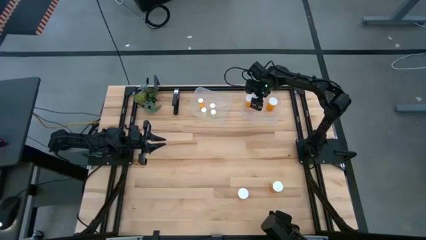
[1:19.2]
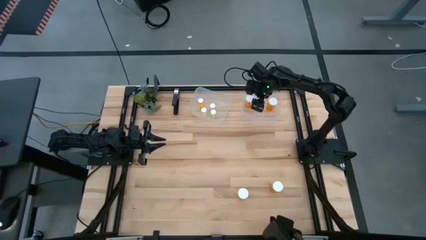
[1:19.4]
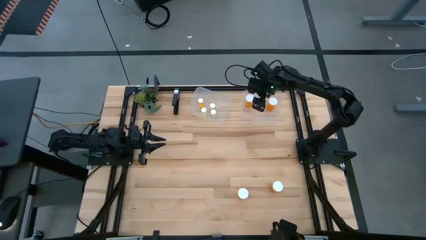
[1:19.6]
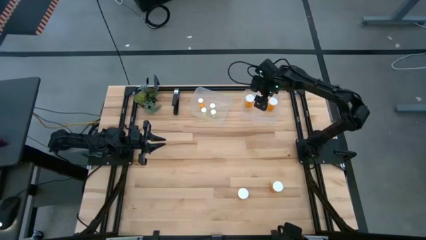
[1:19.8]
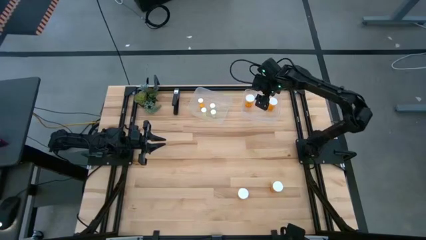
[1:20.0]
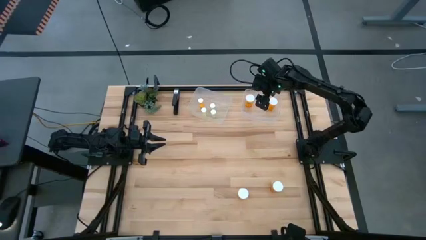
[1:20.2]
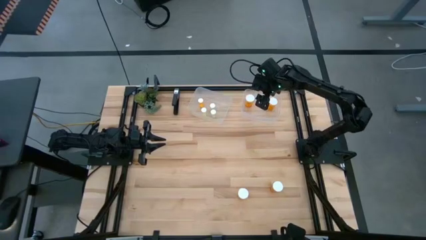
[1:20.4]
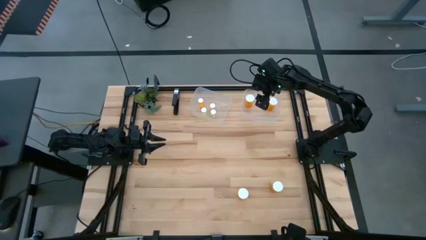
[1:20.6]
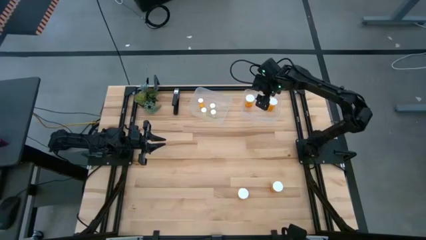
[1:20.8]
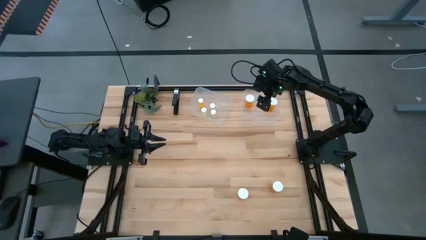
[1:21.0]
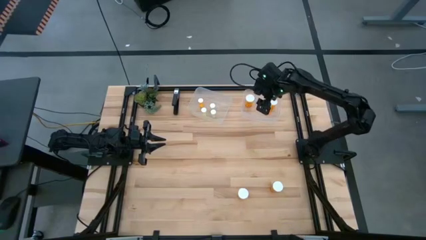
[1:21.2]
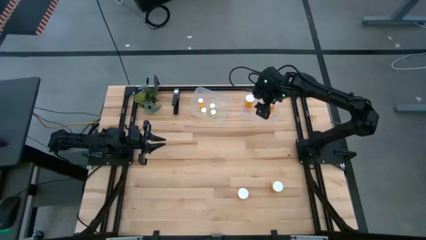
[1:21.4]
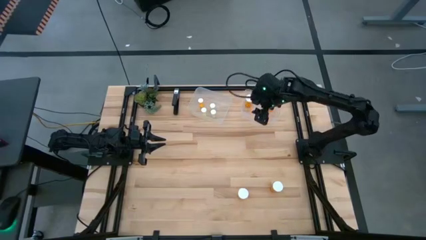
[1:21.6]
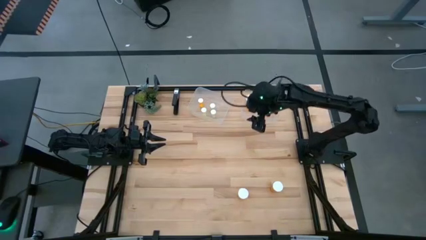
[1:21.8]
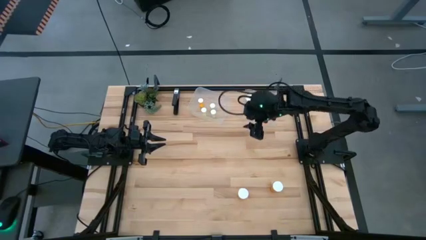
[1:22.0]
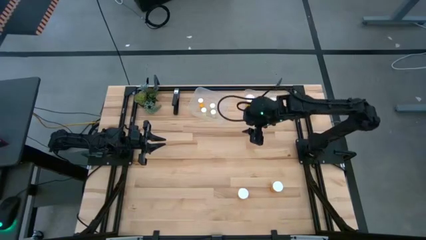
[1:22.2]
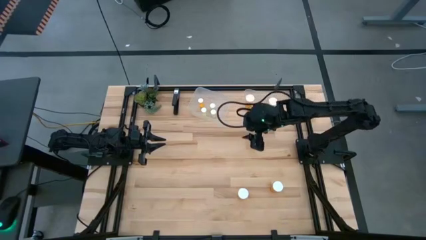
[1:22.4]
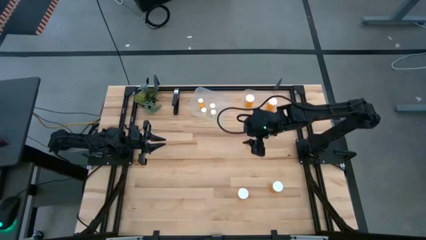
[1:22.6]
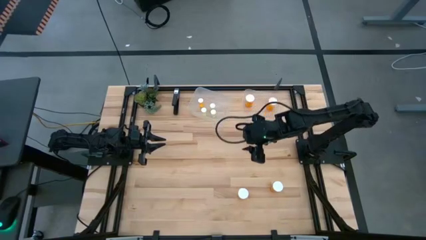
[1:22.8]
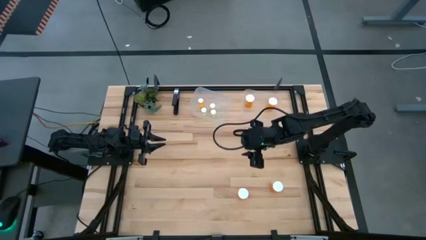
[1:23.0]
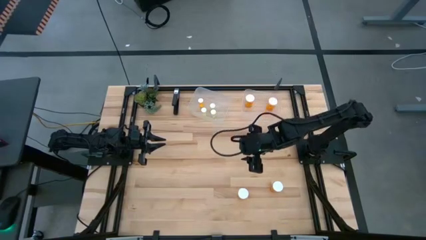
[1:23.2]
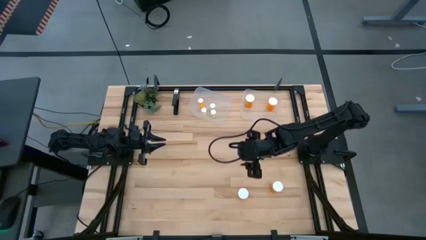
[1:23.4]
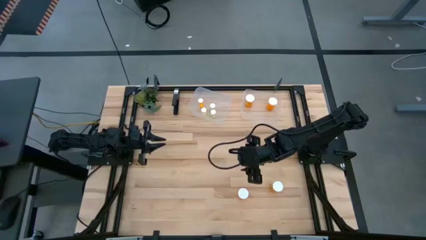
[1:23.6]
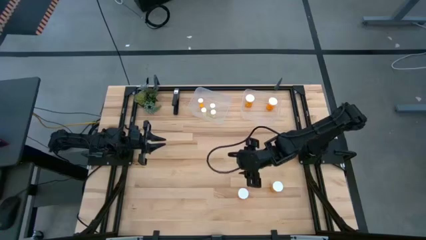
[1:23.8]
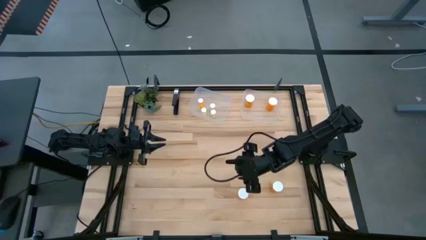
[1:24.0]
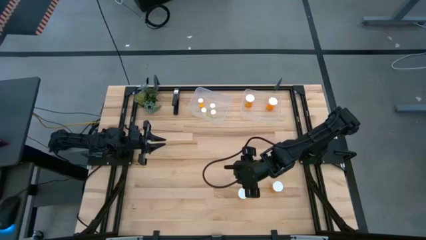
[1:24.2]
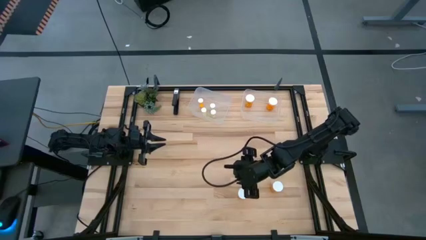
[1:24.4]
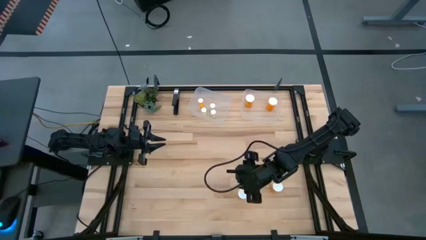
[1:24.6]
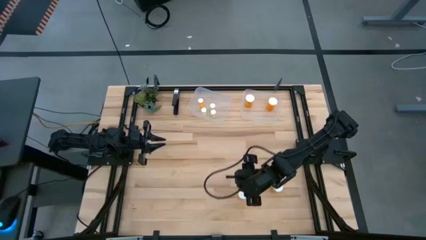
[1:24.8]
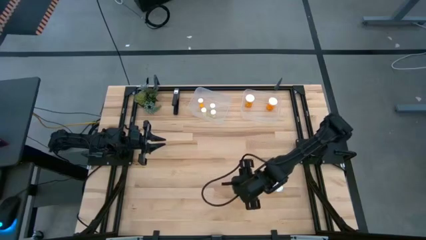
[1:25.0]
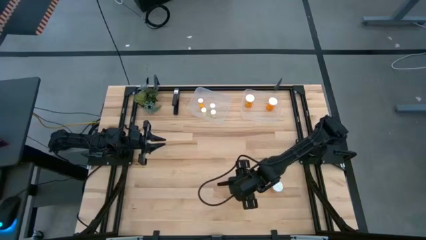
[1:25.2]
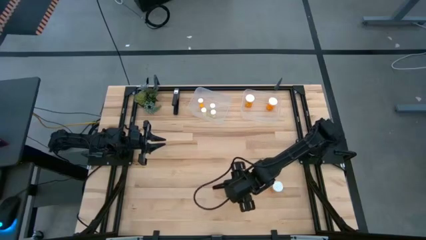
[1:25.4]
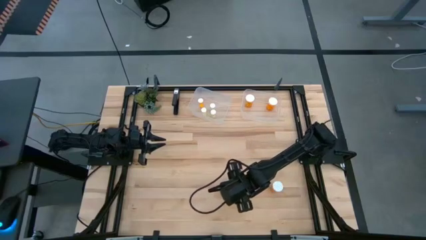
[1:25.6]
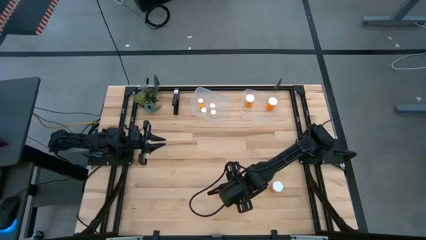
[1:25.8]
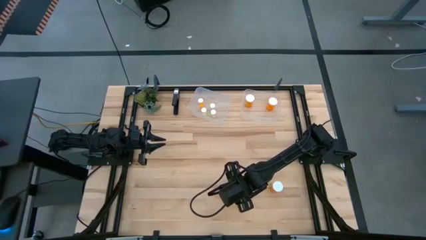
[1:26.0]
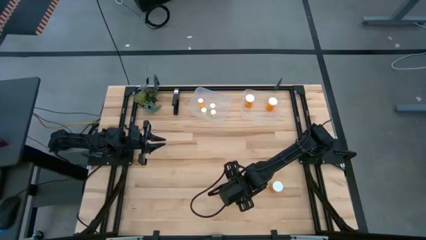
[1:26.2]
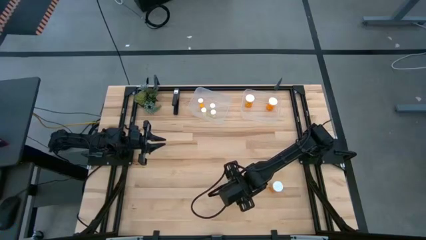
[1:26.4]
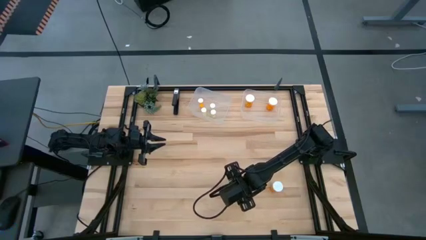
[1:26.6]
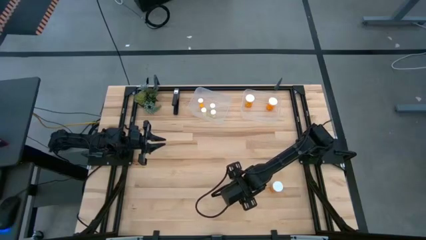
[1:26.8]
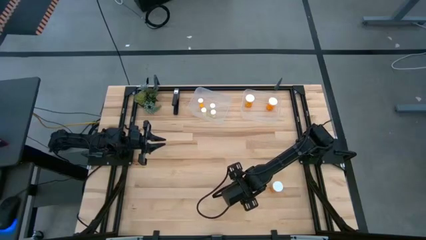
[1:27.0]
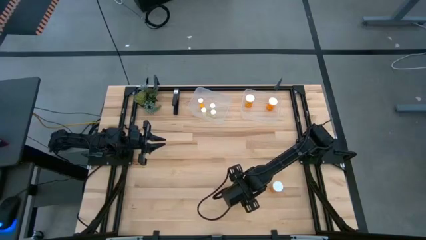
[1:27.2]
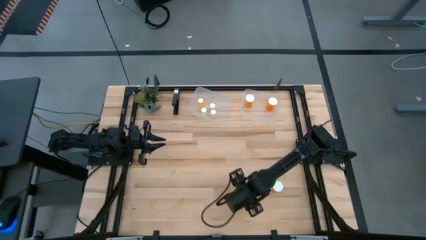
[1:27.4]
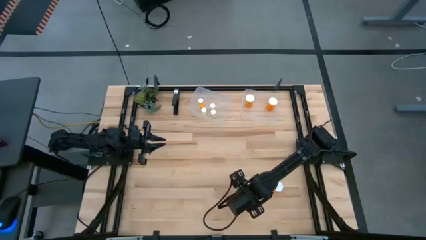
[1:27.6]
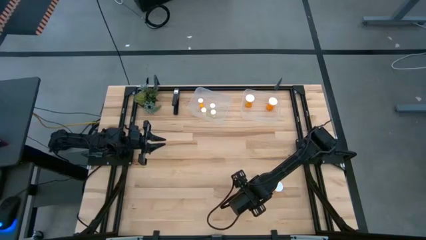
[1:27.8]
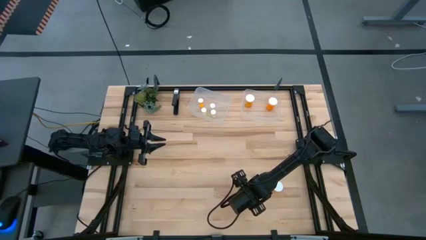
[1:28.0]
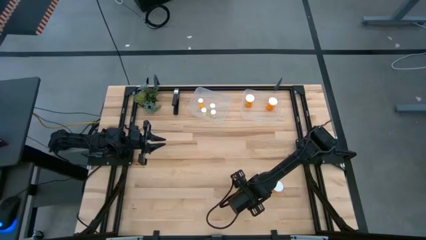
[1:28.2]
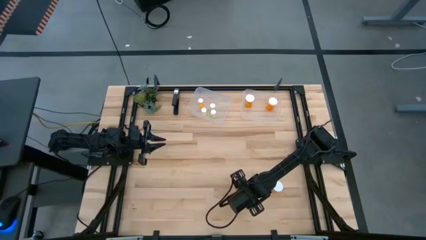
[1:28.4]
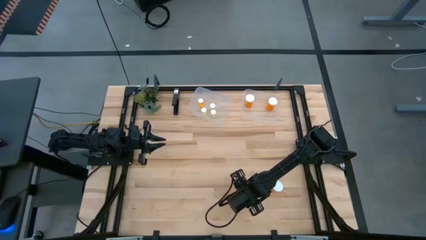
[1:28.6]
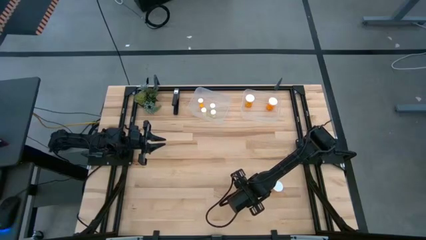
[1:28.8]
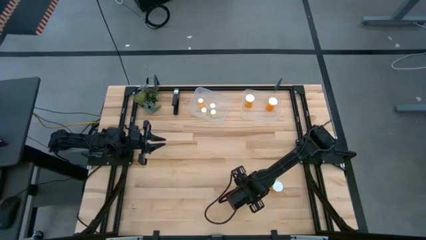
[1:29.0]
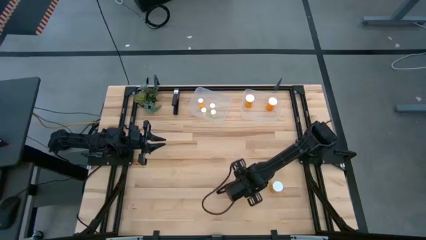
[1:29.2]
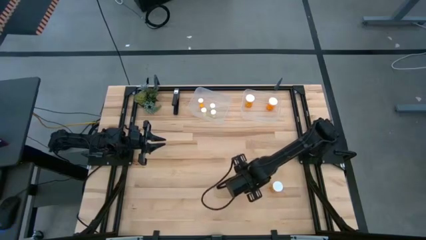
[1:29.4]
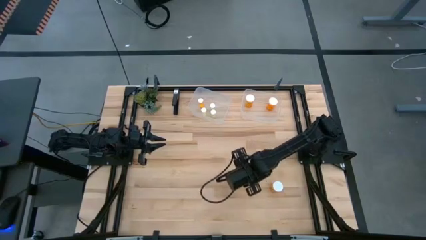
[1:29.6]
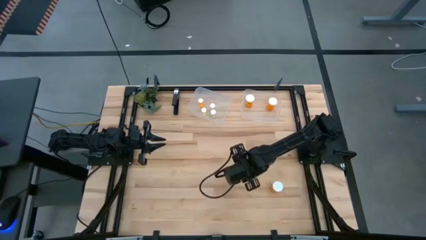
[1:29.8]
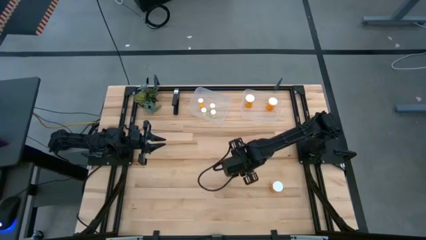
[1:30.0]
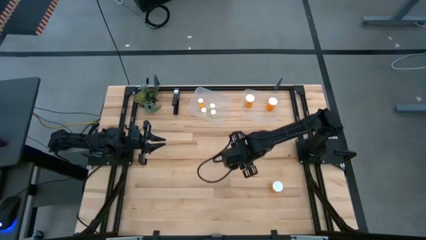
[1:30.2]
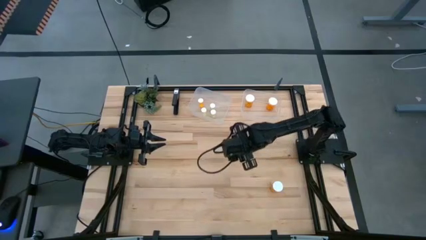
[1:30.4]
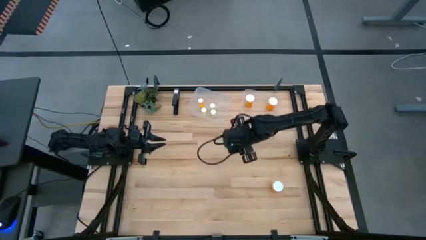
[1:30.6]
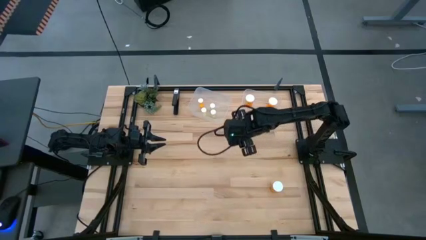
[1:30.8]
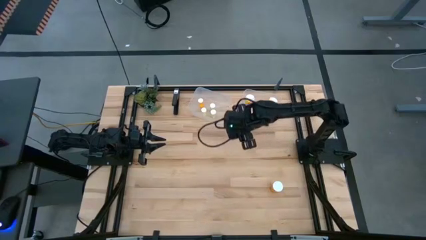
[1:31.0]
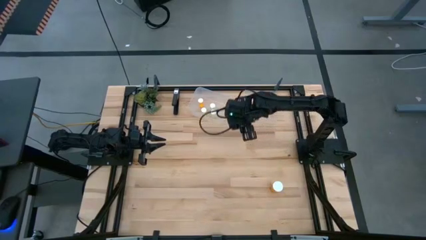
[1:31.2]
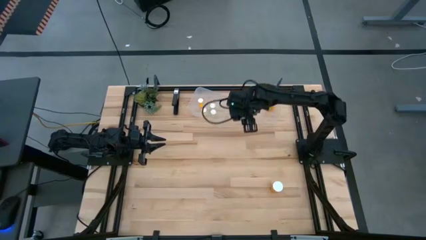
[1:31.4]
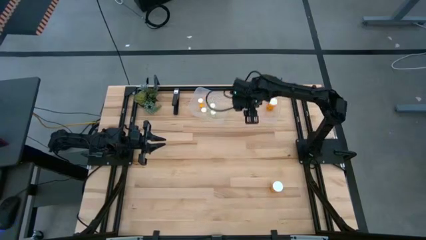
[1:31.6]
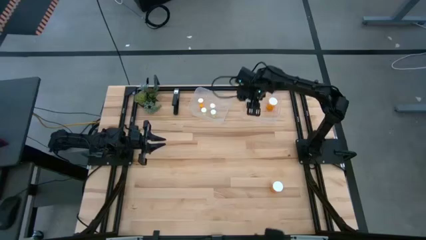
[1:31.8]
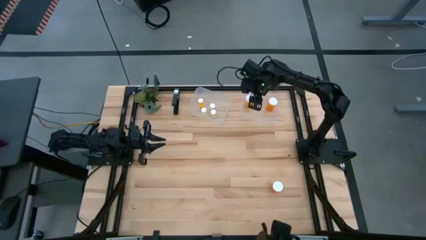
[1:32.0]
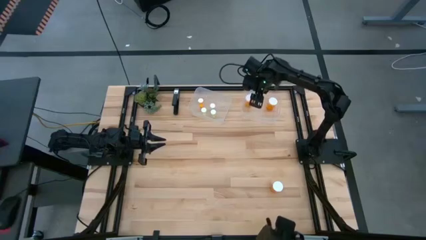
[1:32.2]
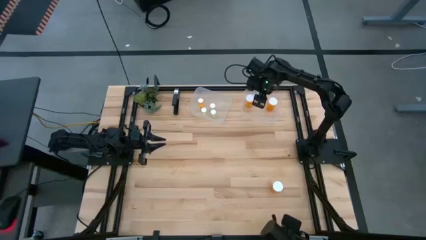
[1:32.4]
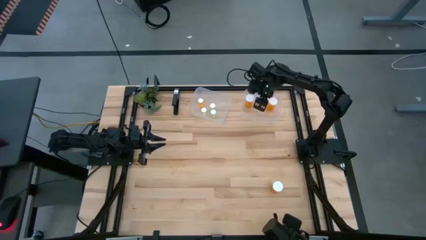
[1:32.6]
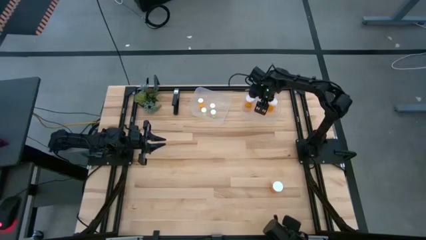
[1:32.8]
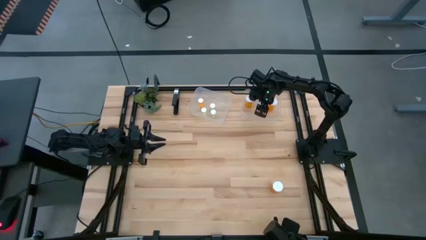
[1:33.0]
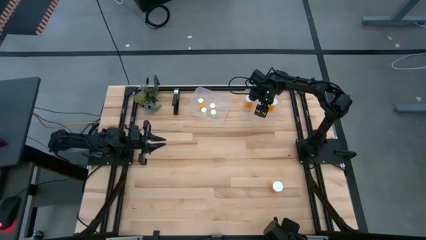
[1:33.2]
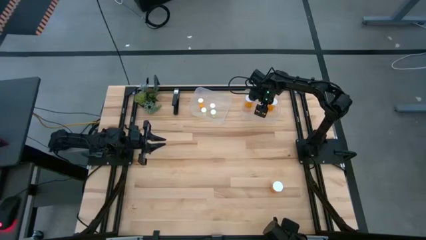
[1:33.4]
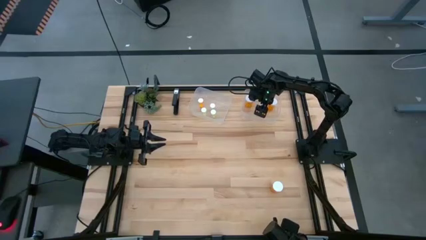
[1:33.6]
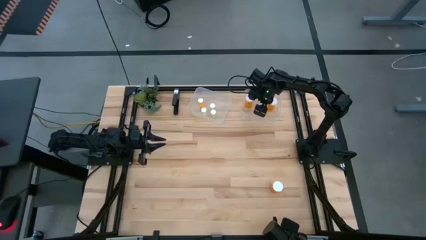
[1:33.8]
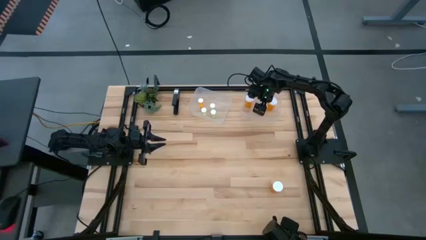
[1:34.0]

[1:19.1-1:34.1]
Task: Pick and place medicine bottles into bin by pill shape (circle, oval)
Put the big orange pill bottle into the right transparent bin
